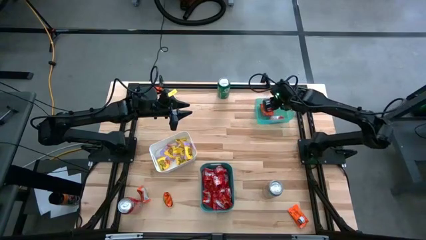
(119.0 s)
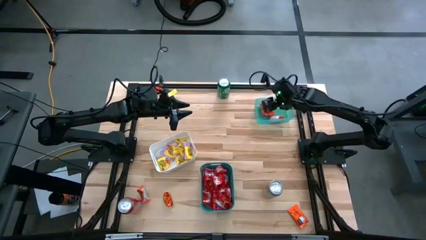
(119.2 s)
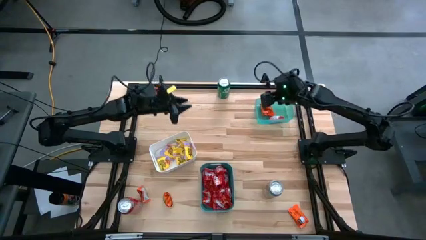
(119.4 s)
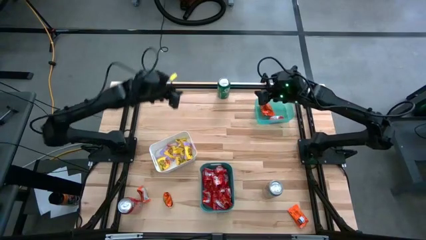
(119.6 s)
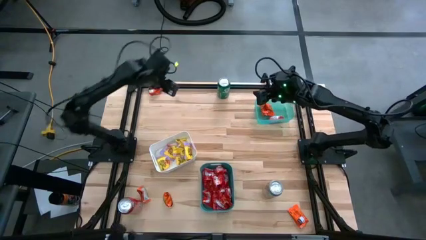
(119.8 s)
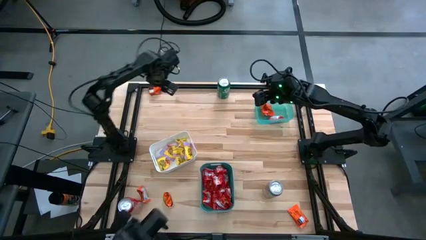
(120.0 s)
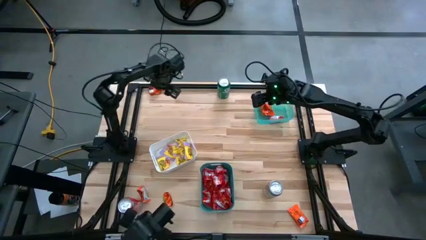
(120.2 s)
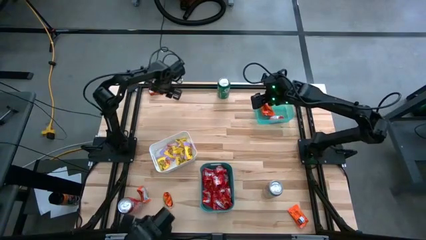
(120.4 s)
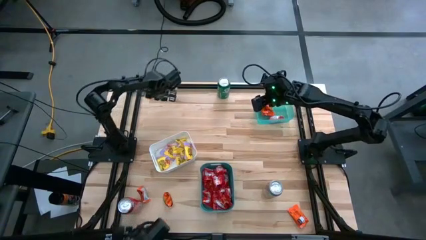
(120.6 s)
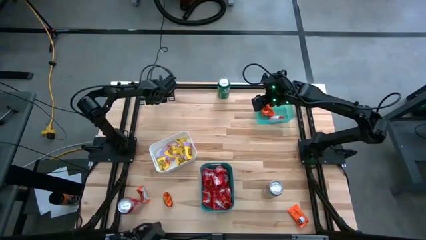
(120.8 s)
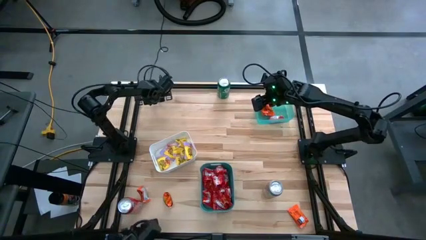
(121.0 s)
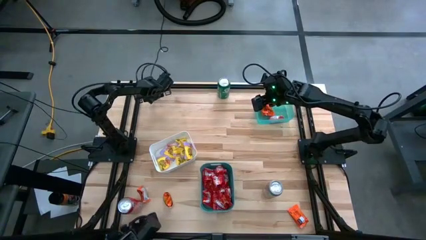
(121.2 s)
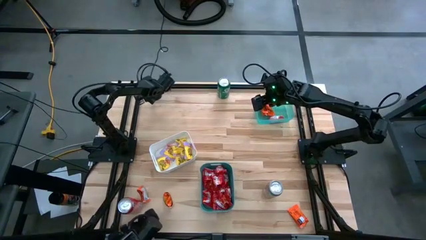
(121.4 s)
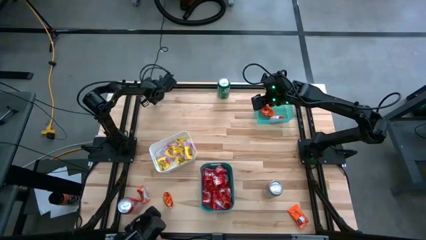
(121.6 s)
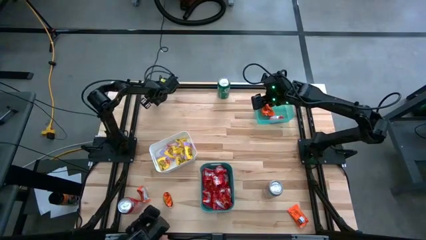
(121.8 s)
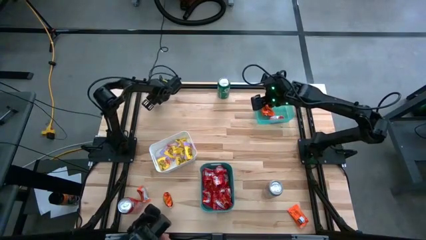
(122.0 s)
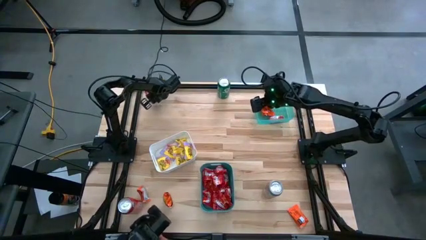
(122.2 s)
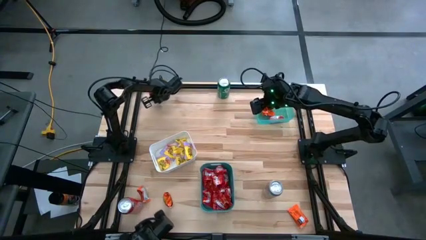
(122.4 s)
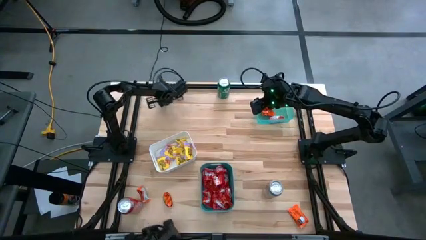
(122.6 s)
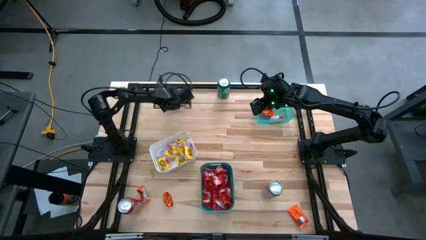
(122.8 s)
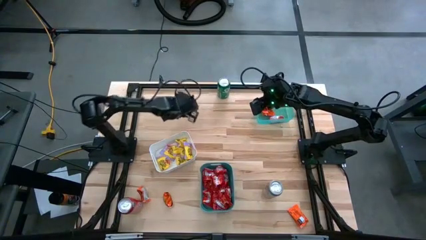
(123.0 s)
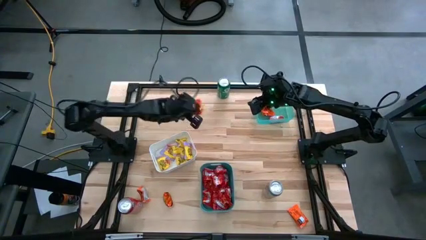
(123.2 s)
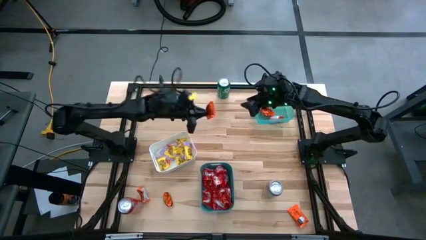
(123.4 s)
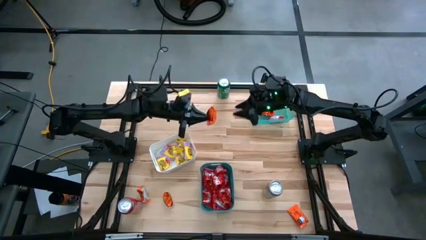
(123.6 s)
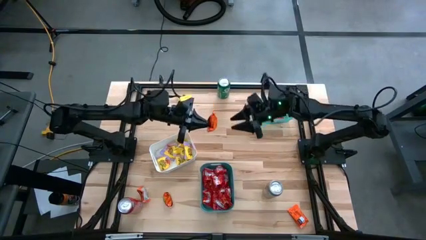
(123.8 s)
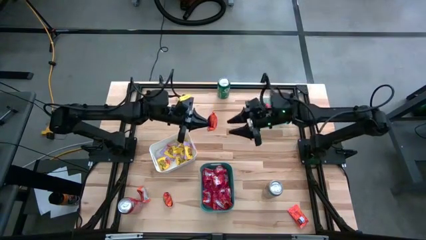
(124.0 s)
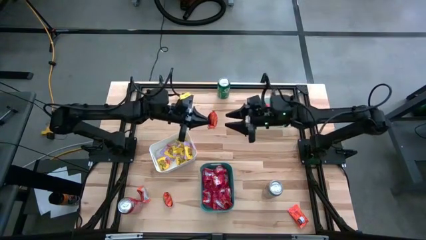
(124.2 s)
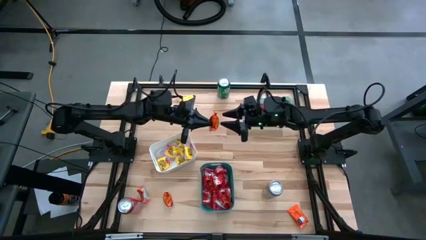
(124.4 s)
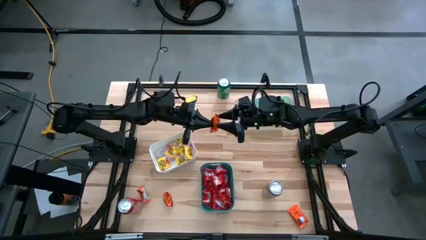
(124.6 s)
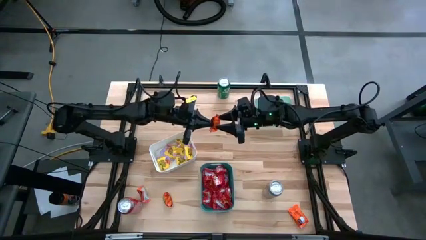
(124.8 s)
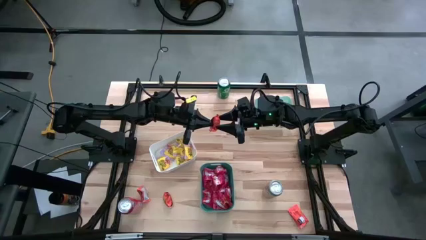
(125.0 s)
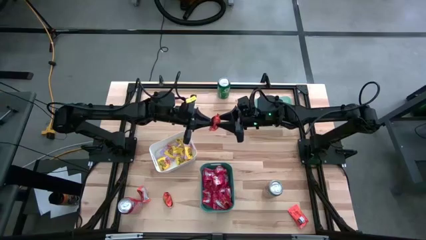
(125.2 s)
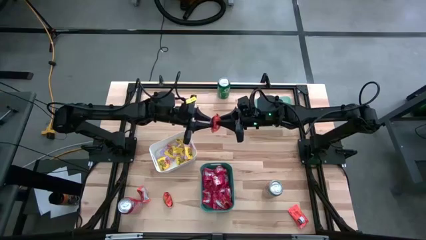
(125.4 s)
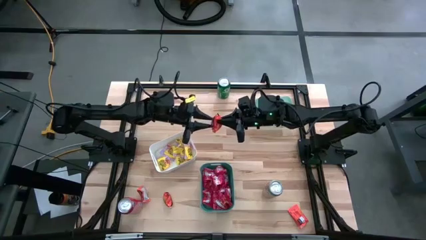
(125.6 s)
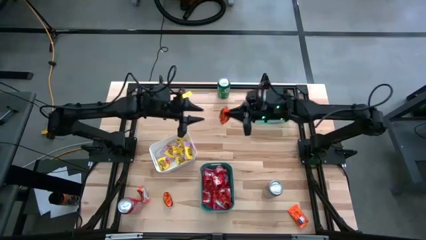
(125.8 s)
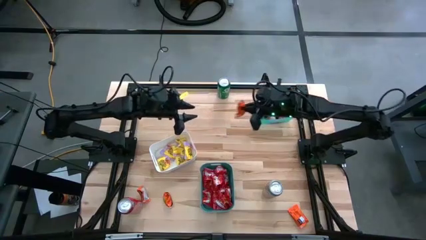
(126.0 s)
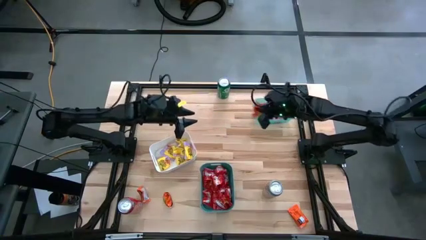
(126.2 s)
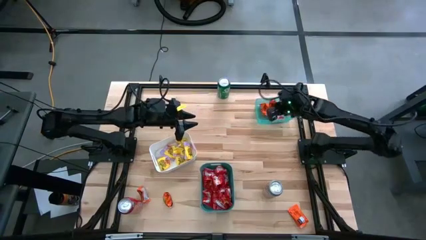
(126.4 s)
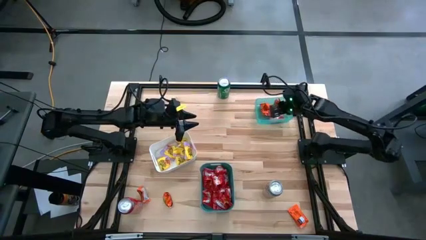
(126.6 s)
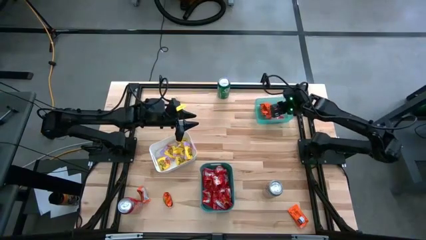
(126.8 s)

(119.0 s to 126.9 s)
Task: Sort candy
Put the orange chocolate into the transparent green bin

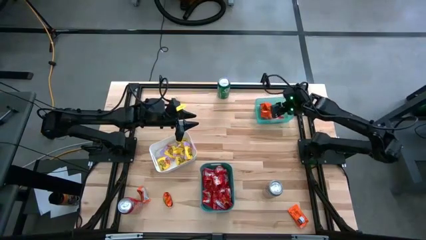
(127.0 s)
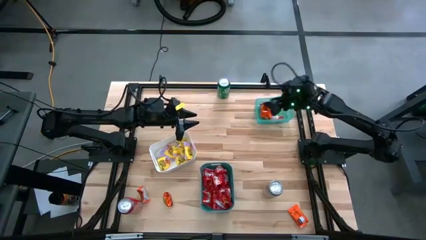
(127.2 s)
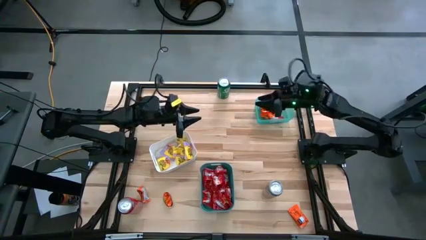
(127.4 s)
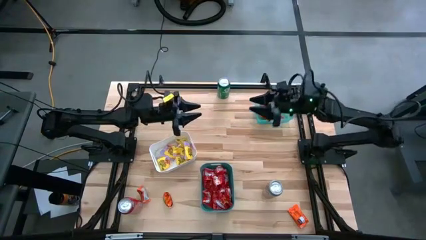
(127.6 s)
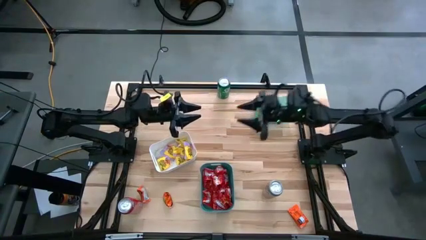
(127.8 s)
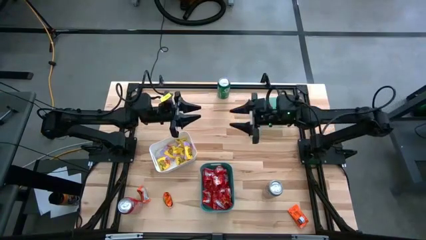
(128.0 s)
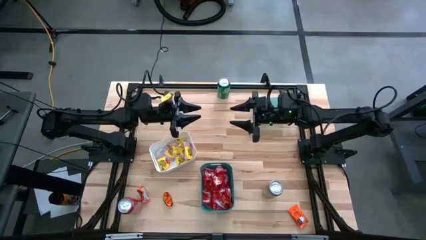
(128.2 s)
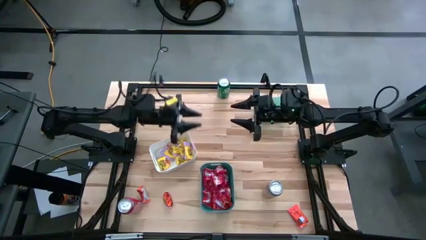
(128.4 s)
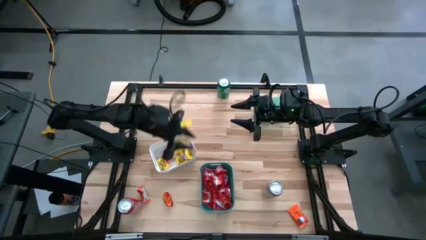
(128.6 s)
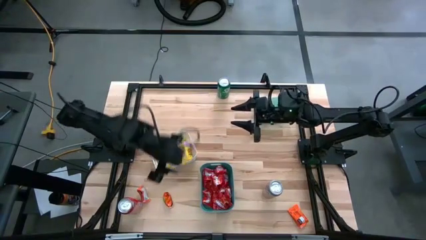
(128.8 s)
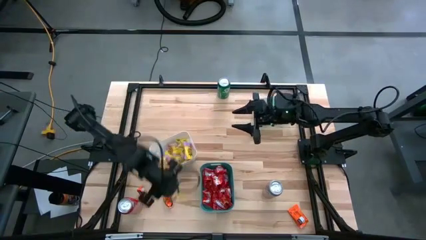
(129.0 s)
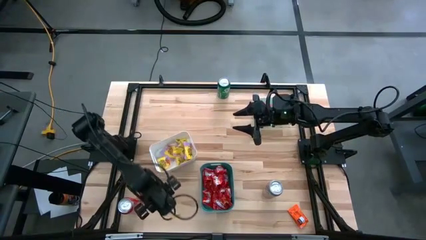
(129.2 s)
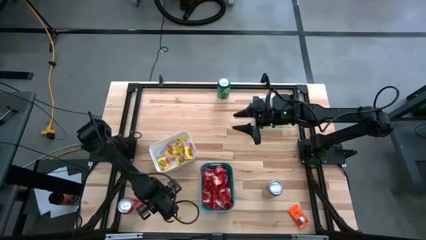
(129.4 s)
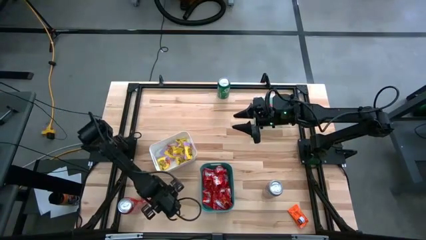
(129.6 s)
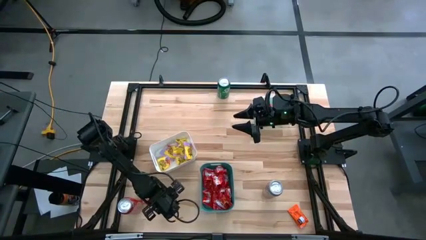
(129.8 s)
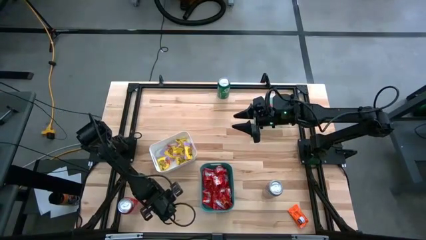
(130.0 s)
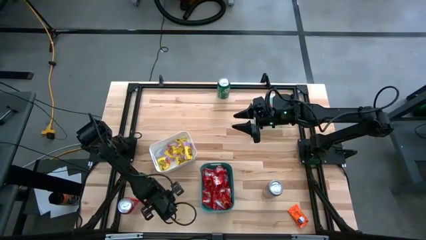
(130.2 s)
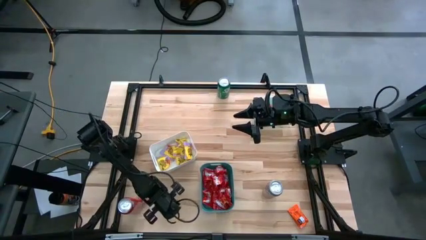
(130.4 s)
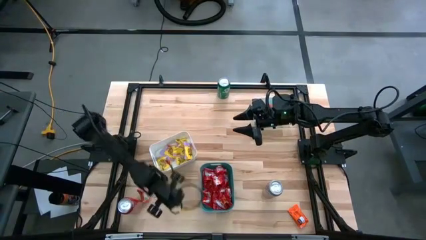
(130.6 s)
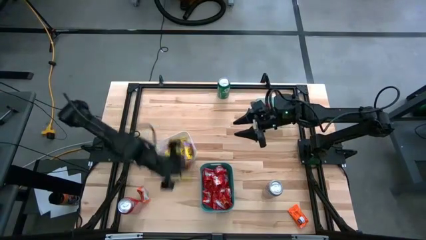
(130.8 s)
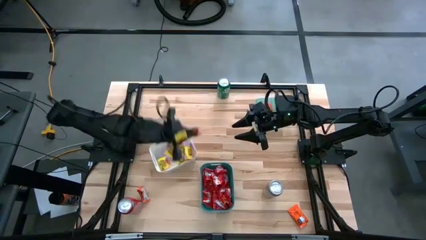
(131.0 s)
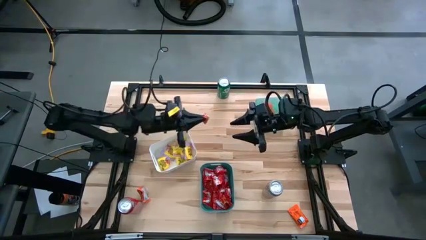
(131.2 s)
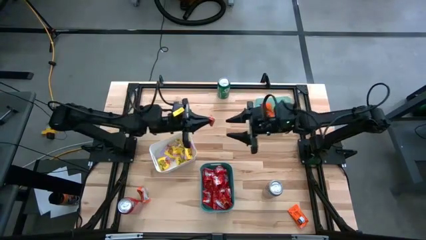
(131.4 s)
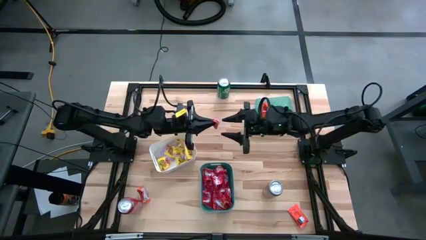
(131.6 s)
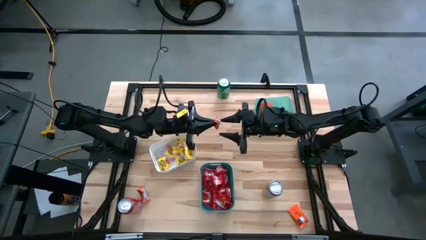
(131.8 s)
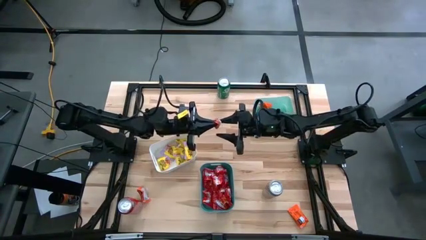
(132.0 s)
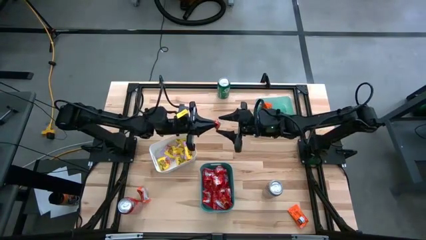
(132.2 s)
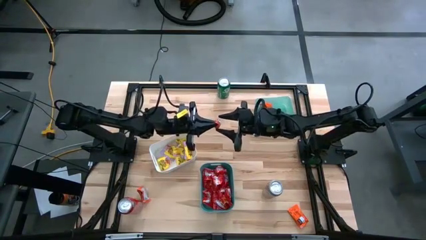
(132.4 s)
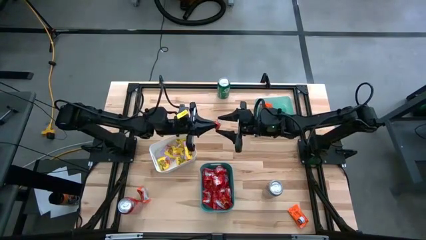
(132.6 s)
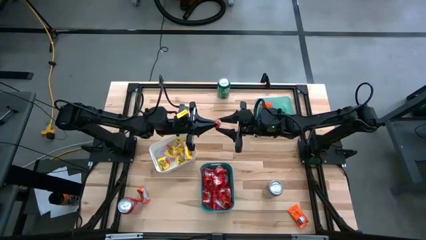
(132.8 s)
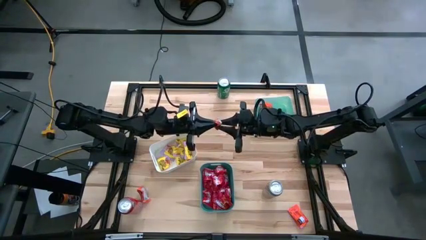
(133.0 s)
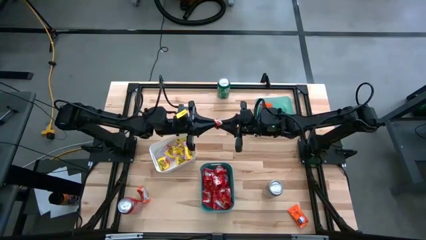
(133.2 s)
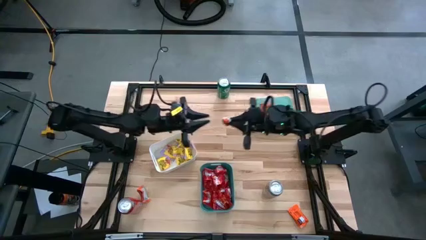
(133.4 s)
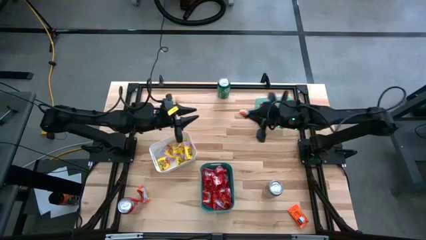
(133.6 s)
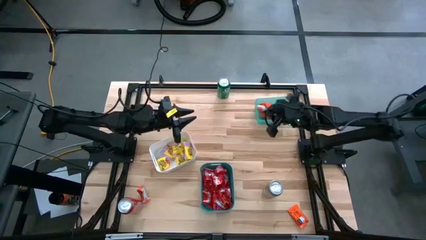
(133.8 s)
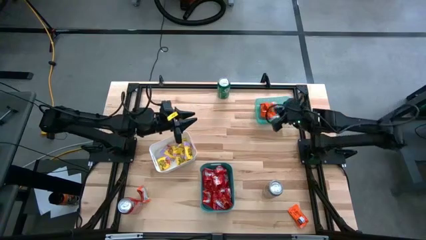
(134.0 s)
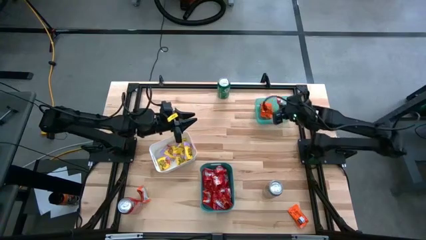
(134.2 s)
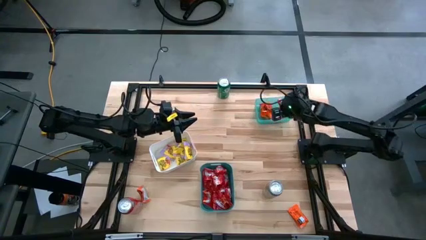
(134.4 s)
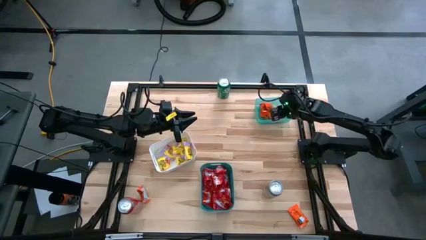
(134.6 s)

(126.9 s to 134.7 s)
Put the orange chocolate into the transparent green bin

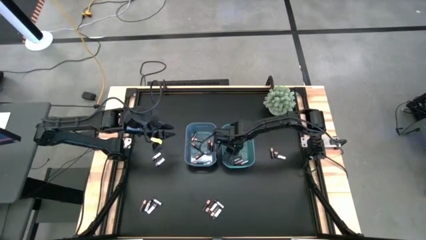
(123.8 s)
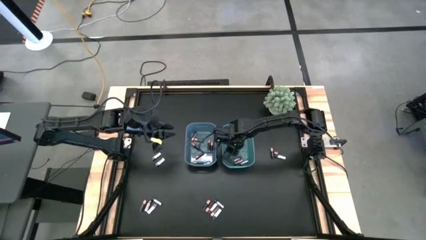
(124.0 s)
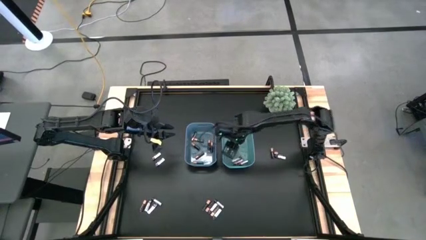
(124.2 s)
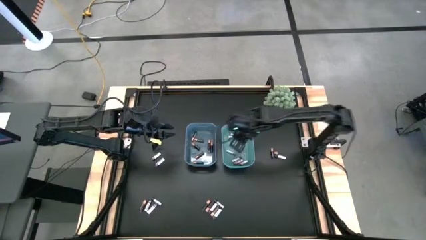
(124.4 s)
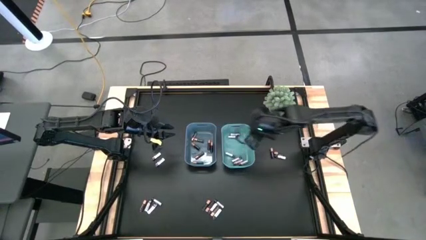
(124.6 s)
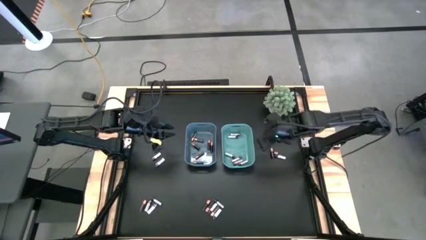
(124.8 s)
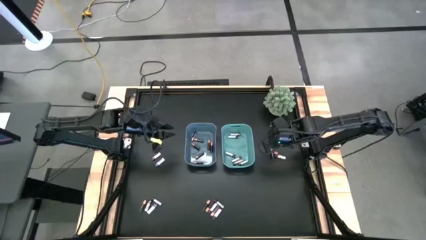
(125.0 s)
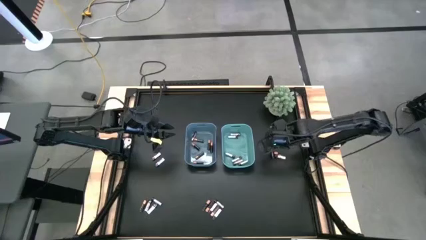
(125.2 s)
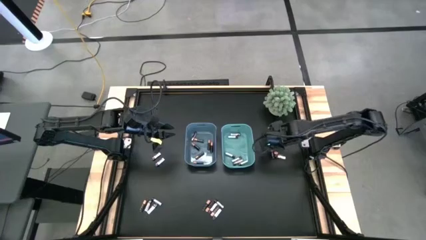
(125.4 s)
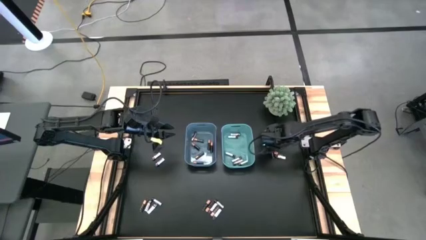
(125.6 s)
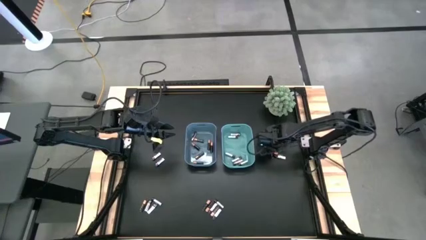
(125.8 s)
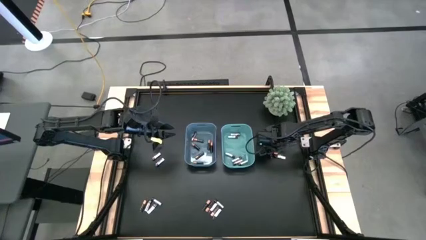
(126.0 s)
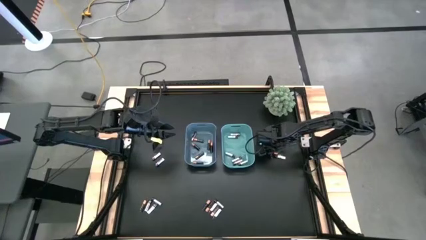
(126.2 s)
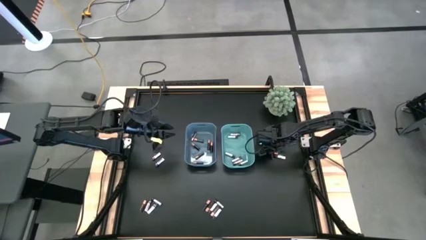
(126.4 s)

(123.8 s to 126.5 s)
Task: Sort batteries
Put the black battery into the blue bin
